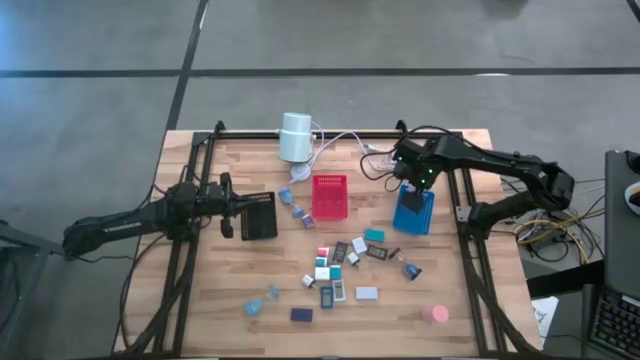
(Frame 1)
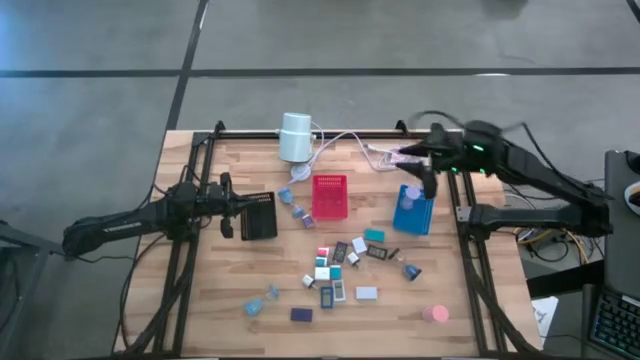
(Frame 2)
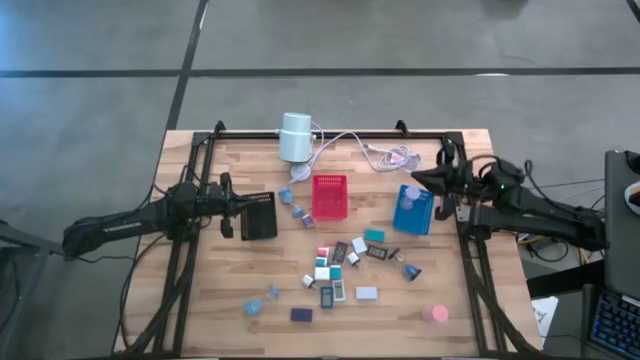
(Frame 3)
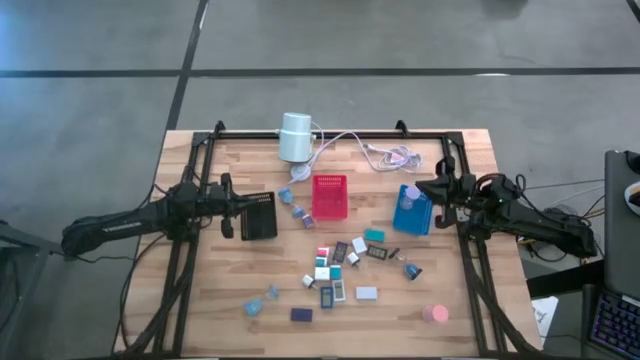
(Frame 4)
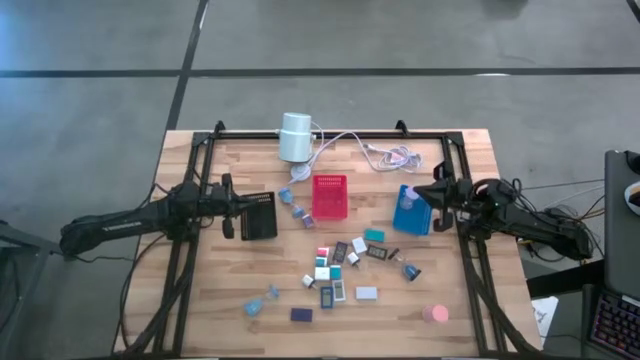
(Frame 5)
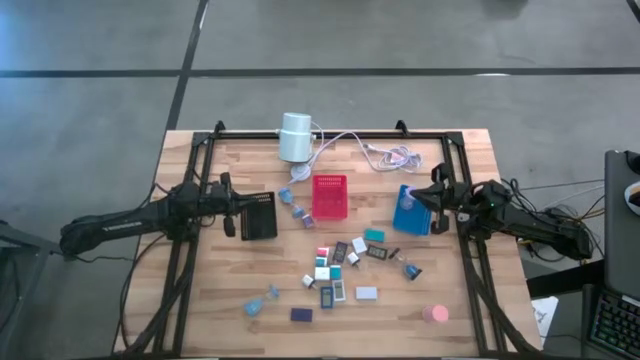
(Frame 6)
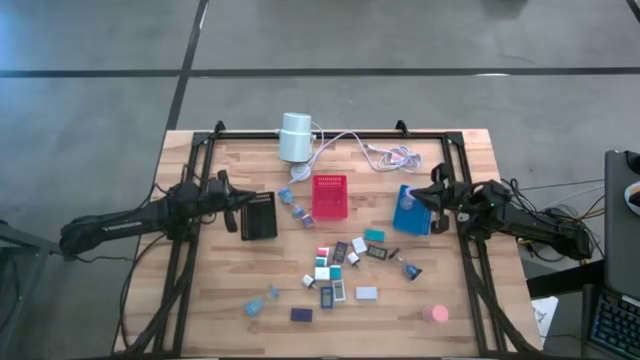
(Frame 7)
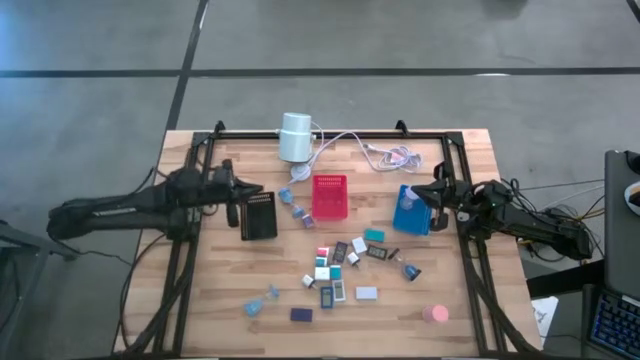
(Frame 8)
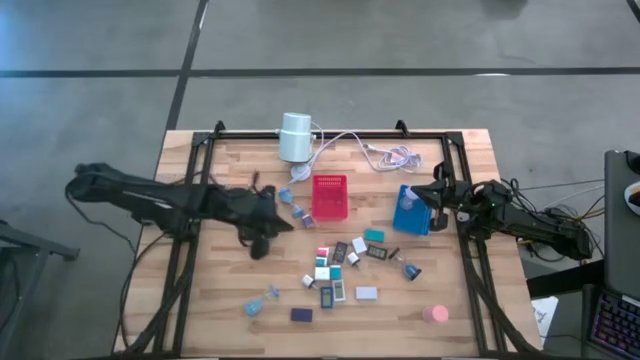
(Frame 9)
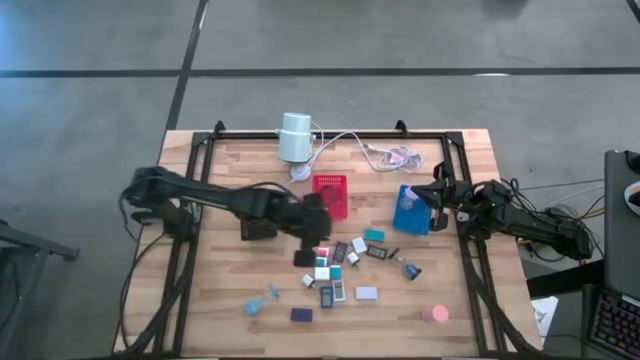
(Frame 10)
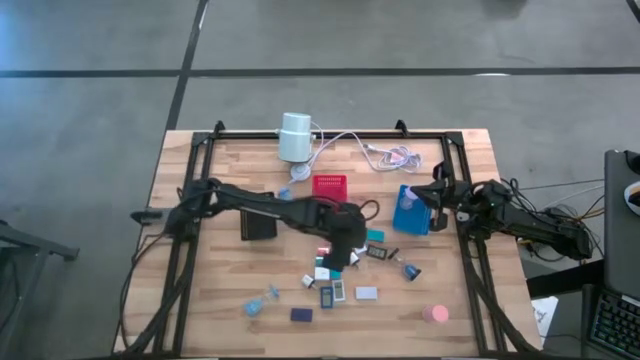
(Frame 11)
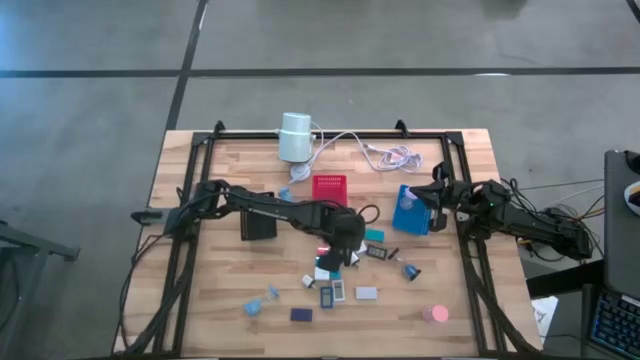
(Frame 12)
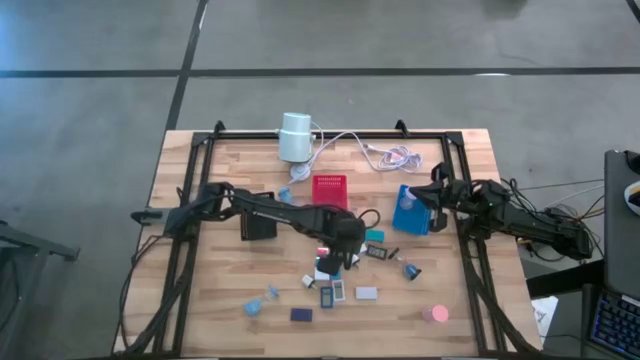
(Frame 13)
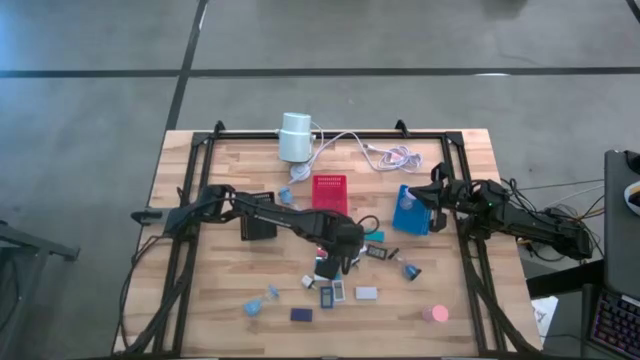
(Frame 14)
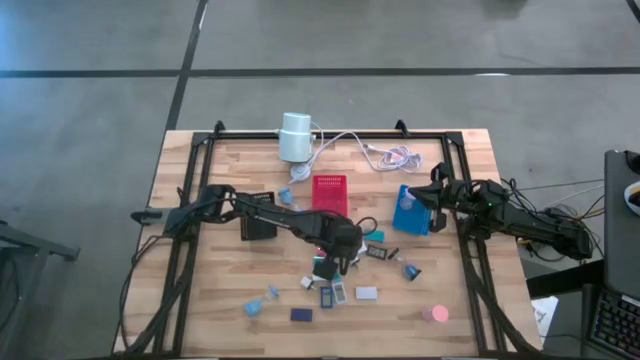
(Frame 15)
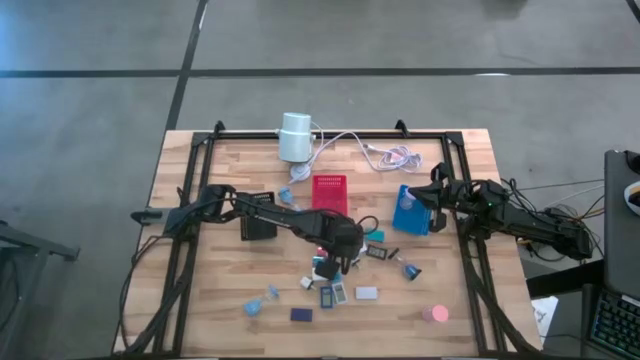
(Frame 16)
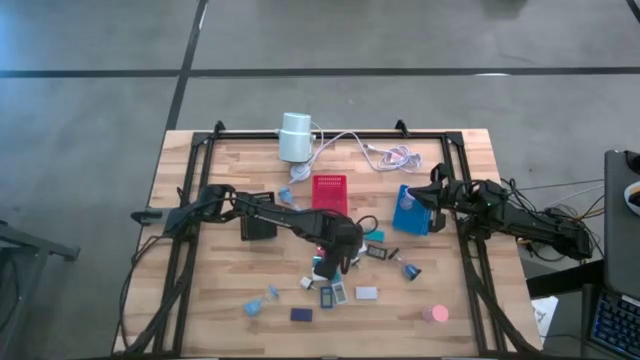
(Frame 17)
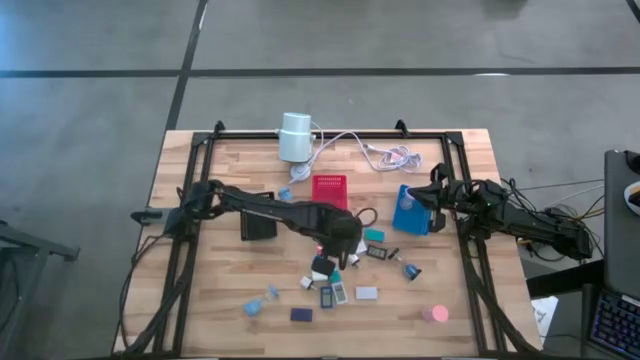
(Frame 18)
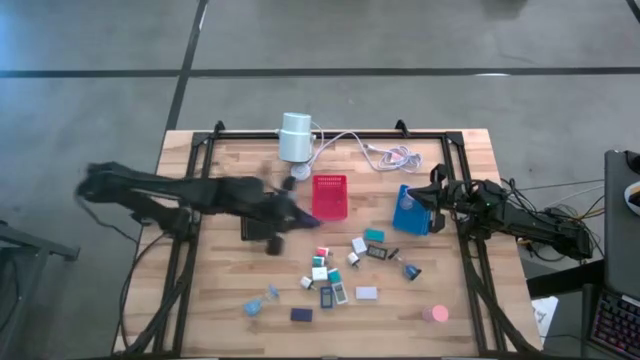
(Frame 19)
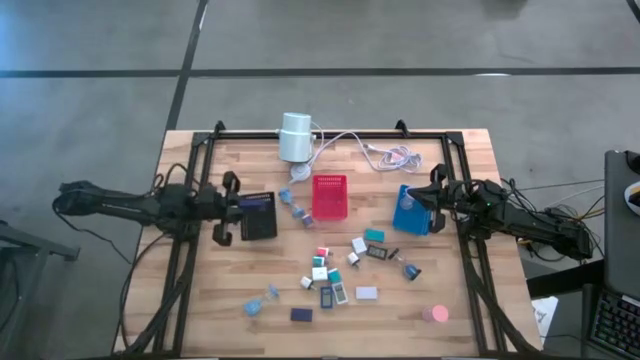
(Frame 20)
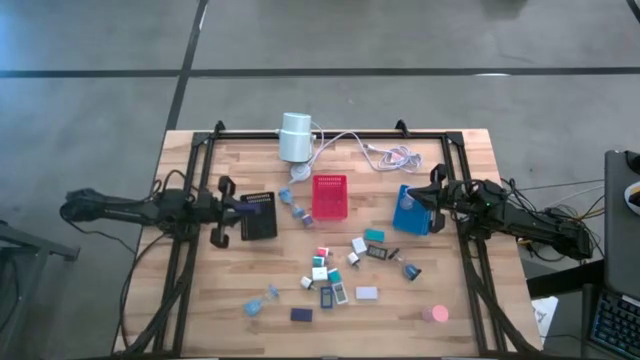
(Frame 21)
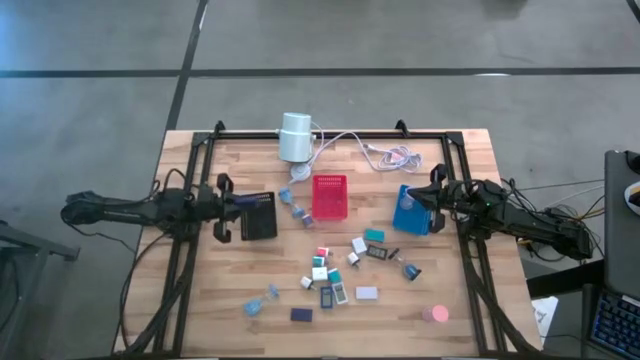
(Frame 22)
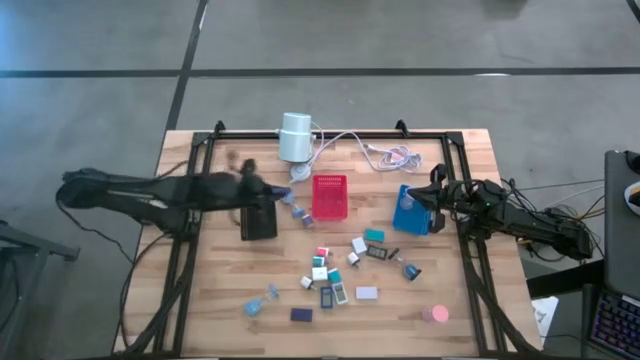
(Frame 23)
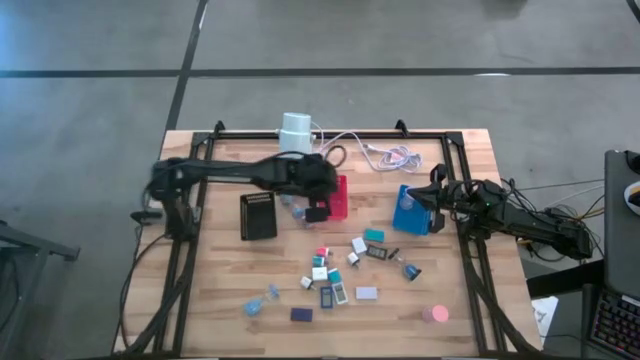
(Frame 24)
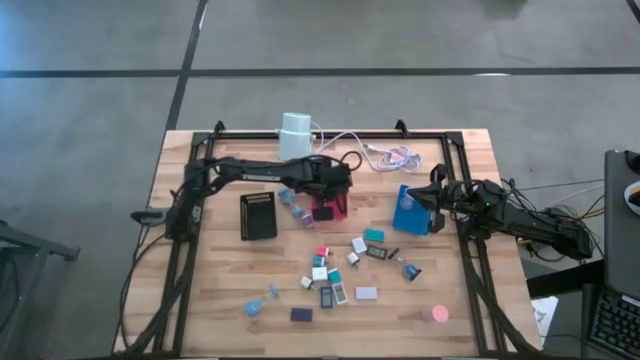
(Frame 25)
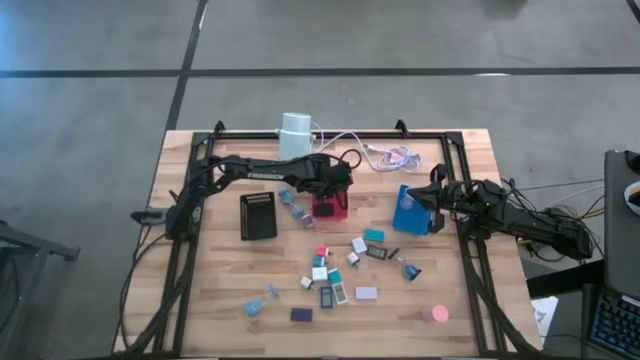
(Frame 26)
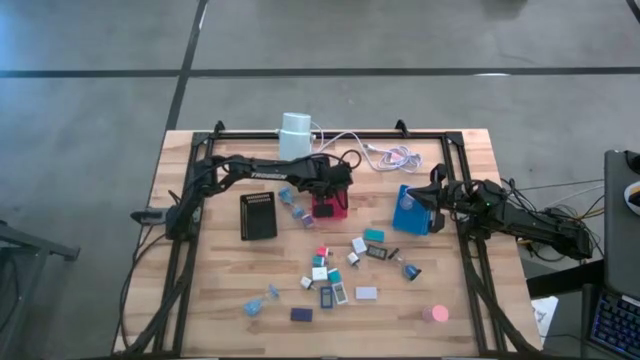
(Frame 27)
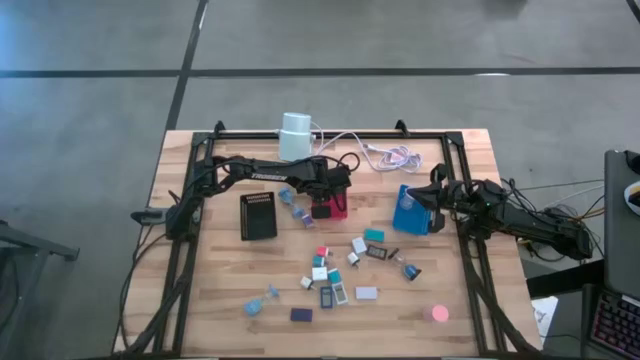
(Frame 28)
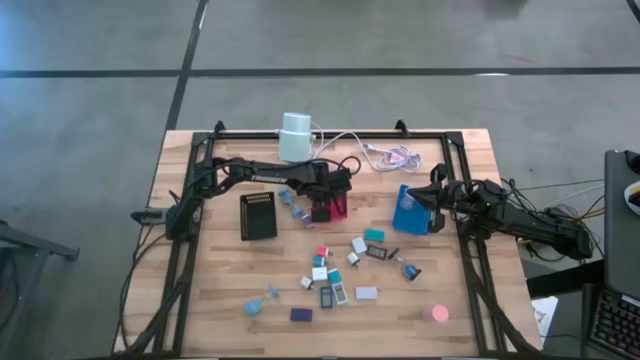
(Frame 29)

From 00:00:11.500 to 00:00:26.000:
Task: Pick & Place Office items
Put the top blue digital clock into the red basket
